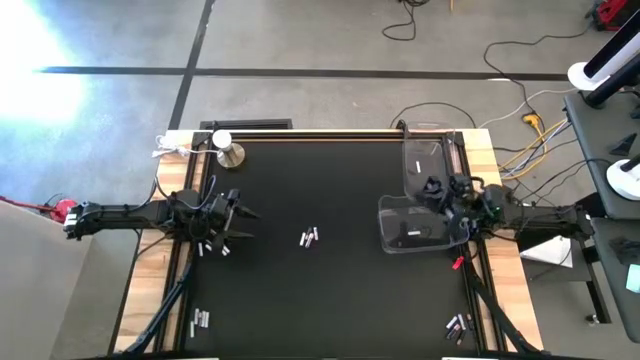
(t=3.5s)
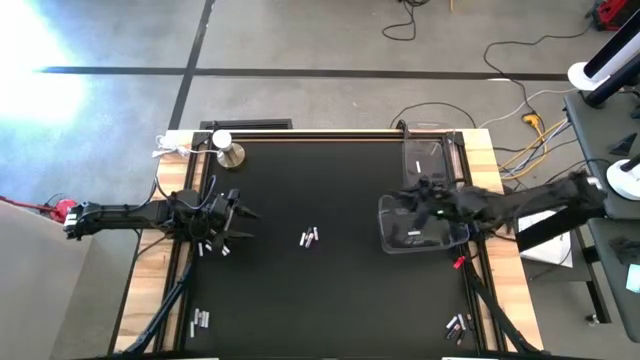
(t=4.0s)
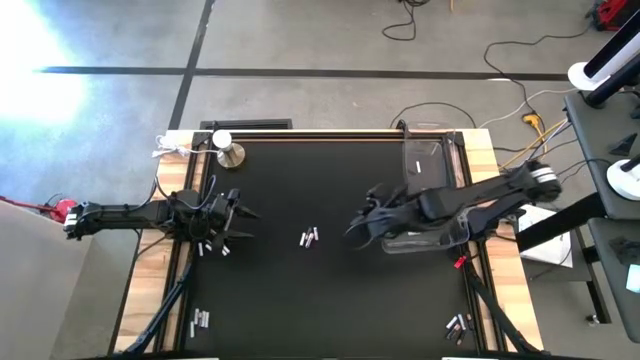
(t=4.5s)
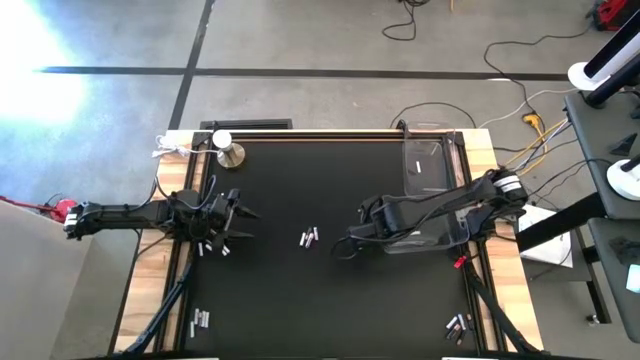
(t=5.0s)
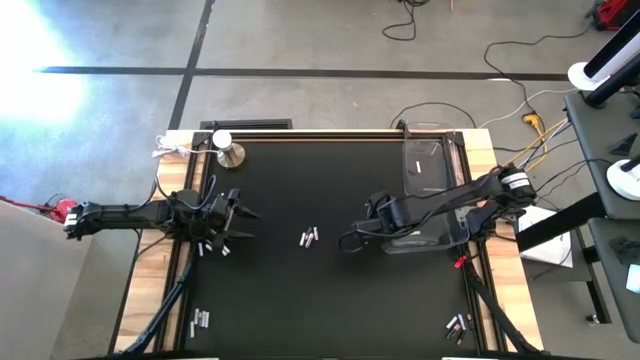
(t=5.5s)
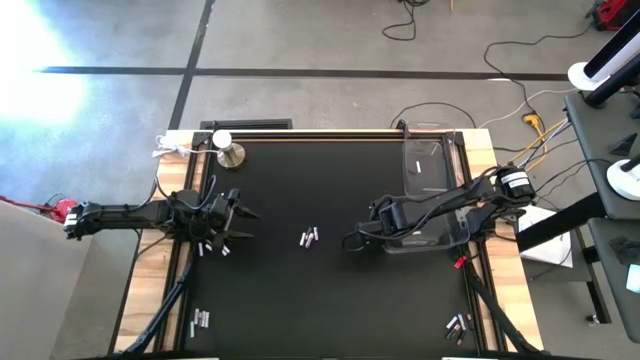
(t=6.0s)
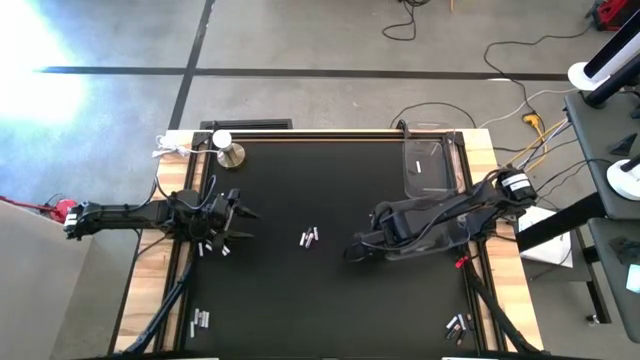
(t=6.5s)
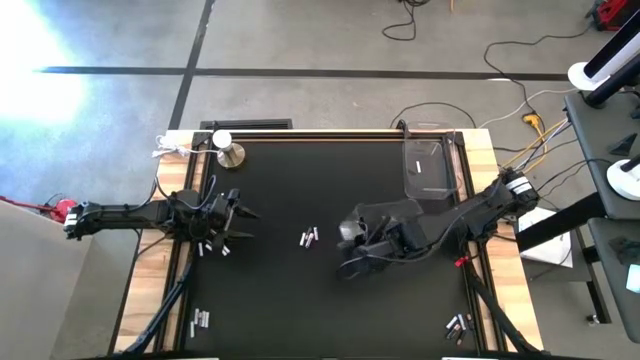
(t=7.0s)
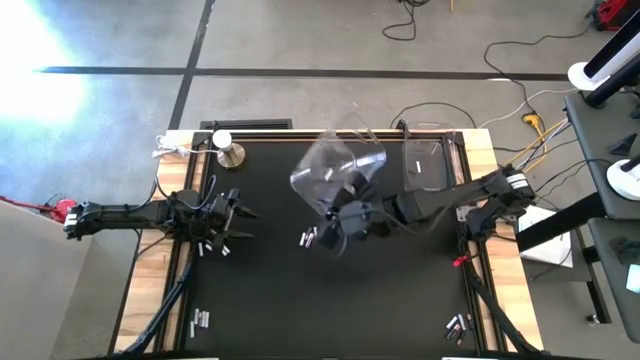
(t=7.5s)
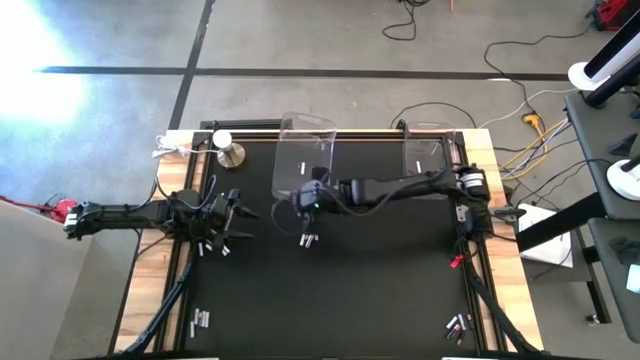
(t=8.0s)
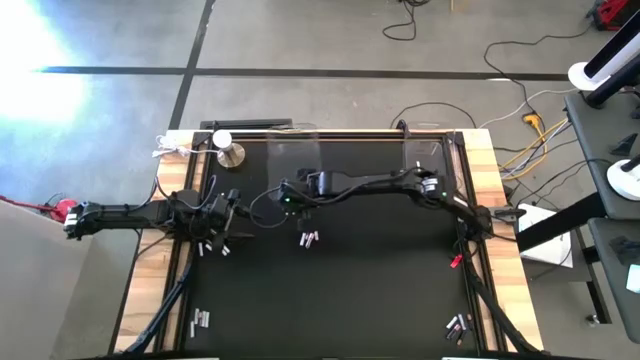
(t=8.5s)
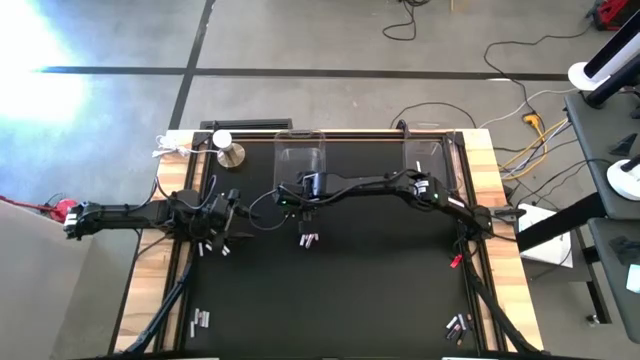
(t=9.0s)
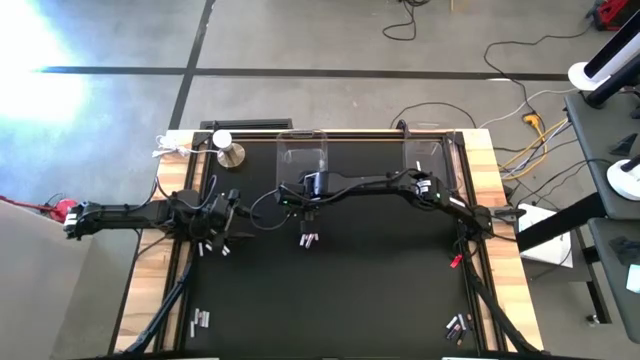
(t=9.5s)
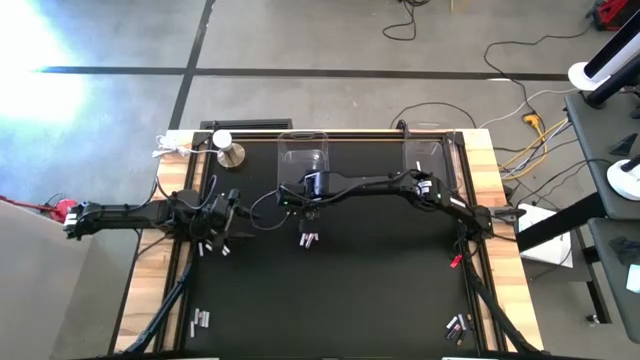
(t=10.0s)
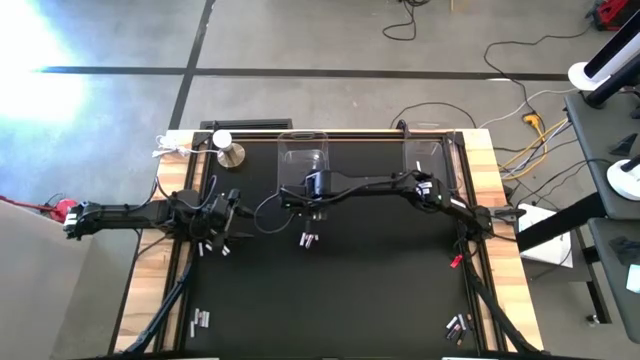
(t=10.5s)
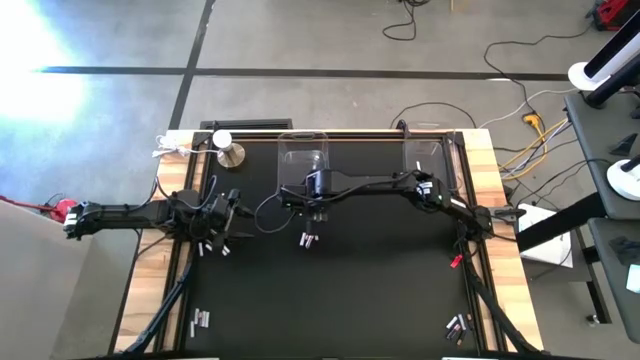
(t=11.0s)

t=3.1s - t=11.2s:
Task: Sort batteries
Move the bottom transparent bin to the top center of the table

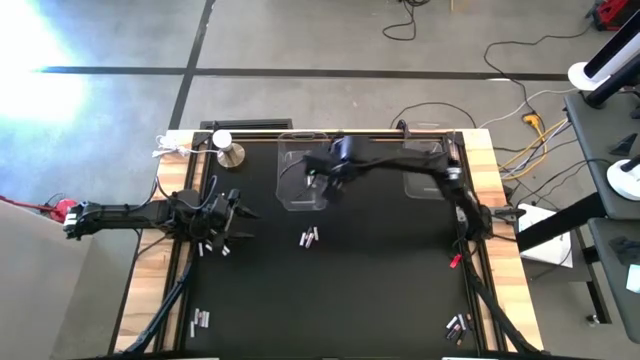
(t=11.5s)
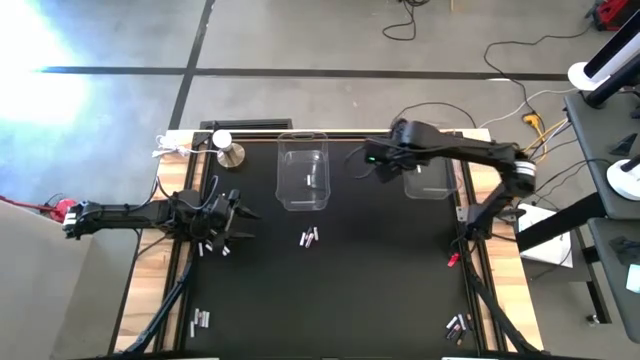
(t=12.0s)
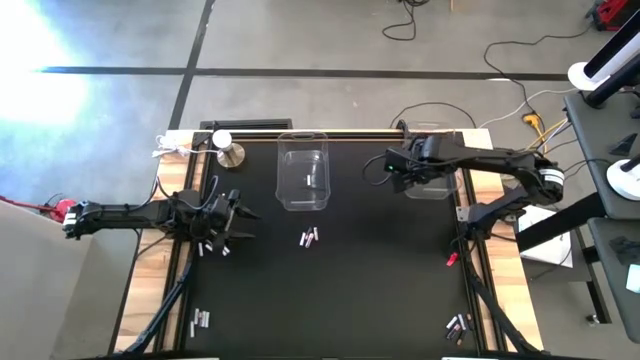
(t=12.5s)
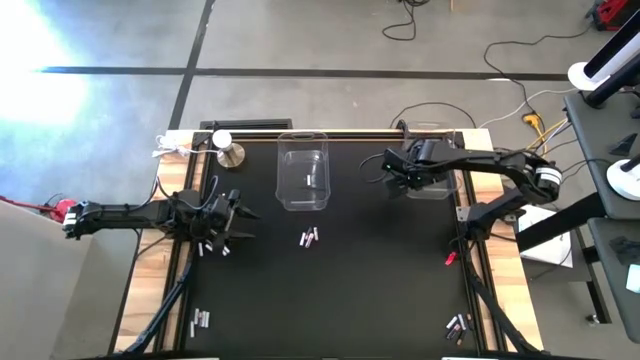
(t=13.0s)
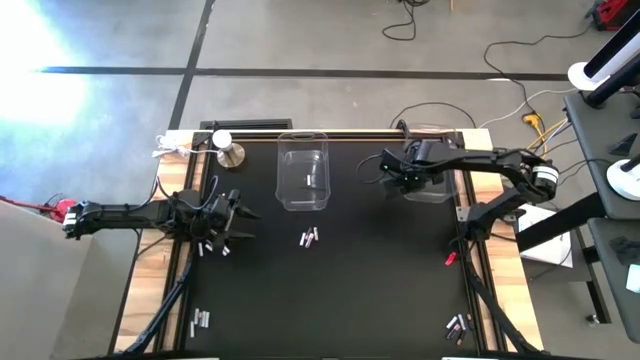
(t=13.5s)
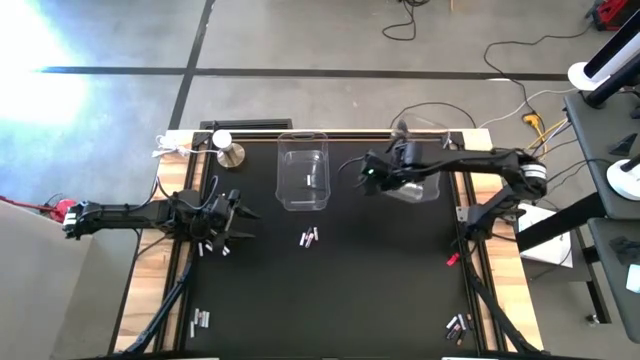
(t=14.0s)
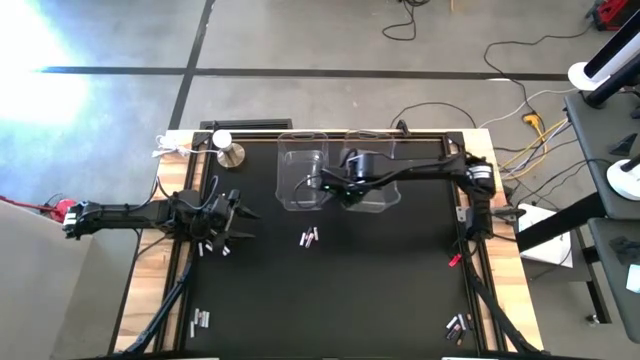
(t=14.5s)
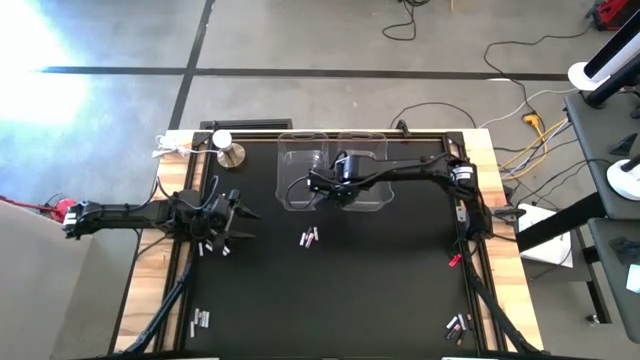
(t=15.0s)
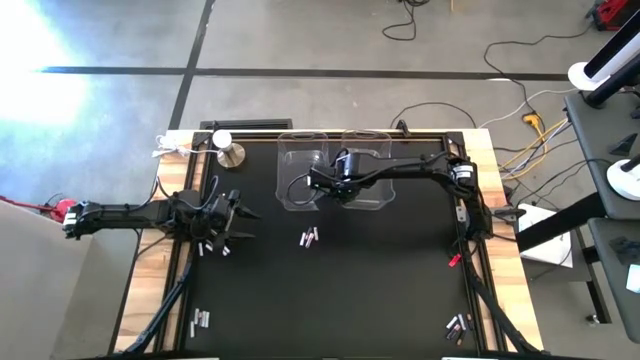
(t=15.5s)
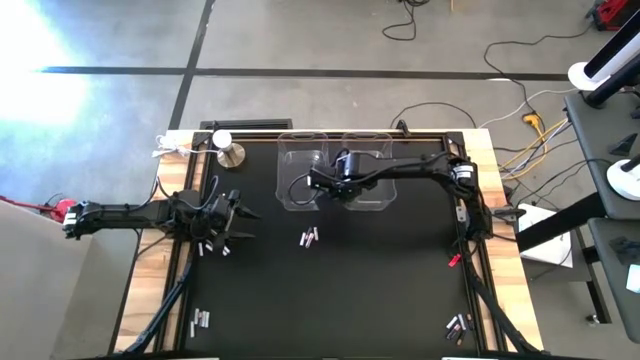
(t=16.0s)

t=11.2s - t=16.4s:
Move the right transparent bin to the right of the left transparent bin

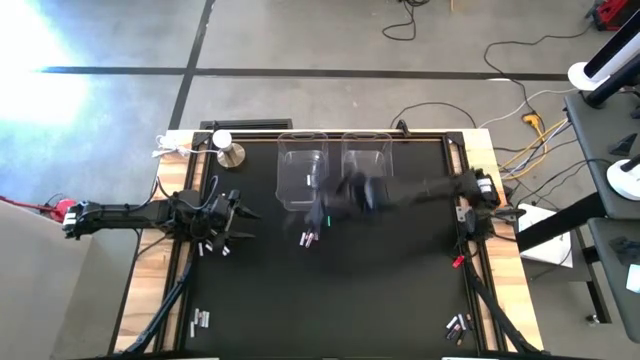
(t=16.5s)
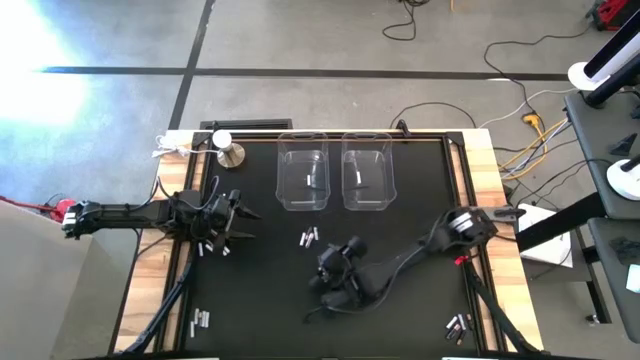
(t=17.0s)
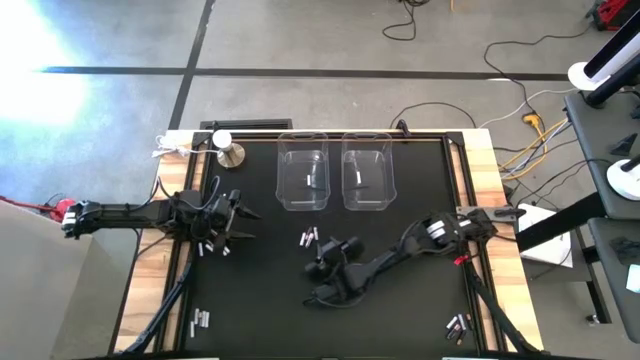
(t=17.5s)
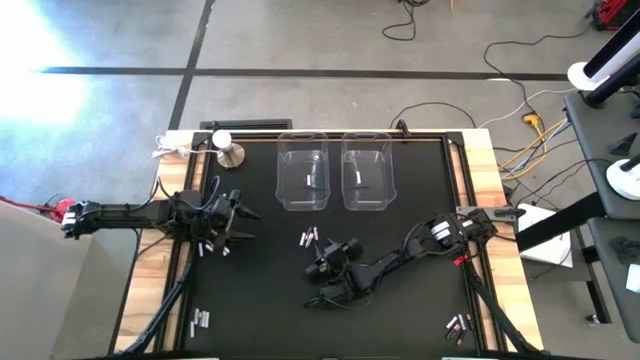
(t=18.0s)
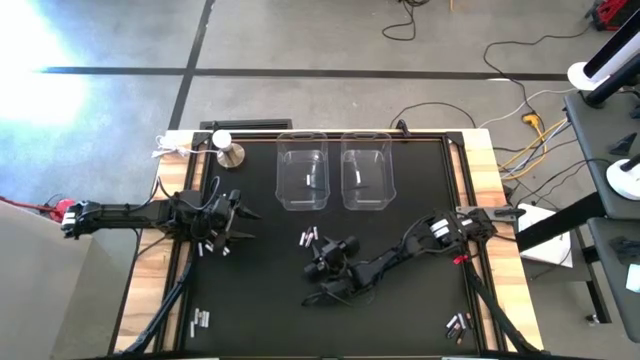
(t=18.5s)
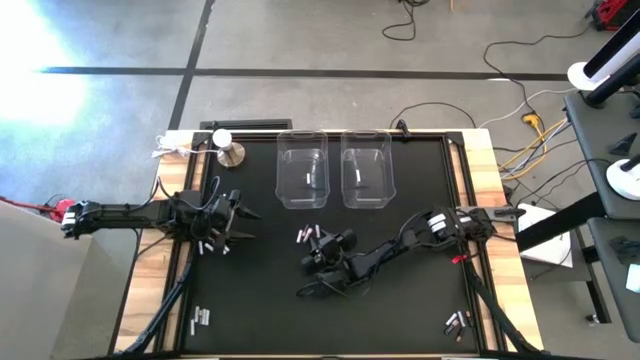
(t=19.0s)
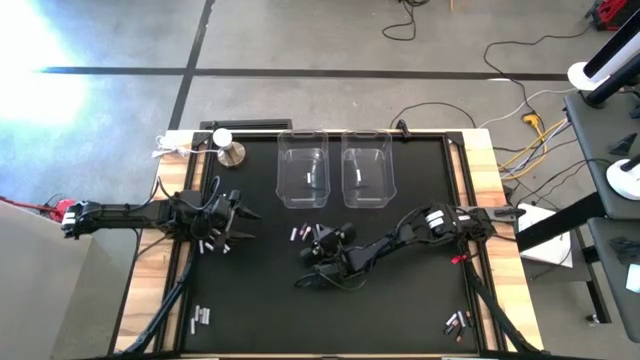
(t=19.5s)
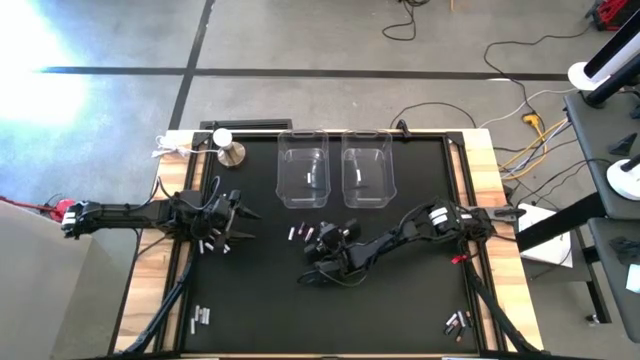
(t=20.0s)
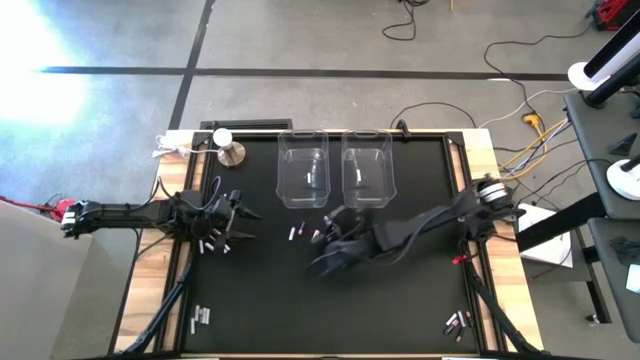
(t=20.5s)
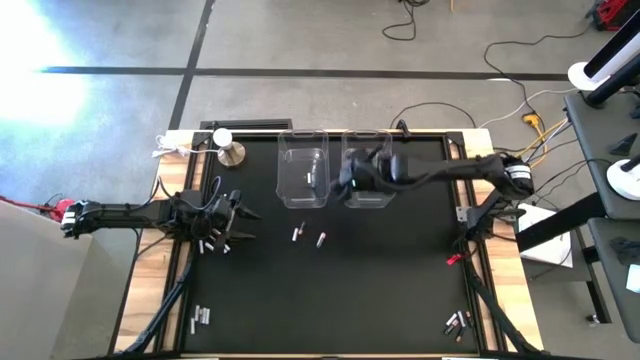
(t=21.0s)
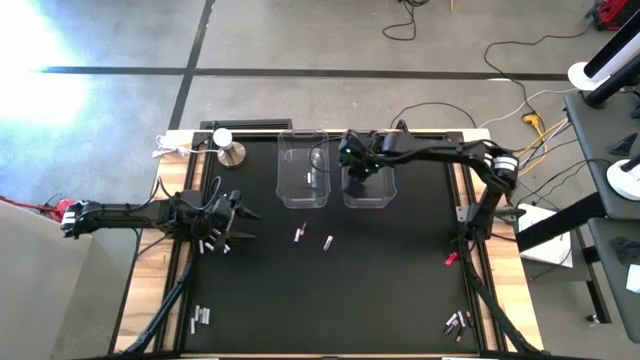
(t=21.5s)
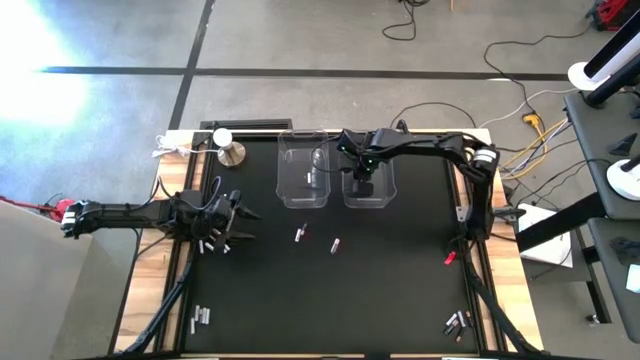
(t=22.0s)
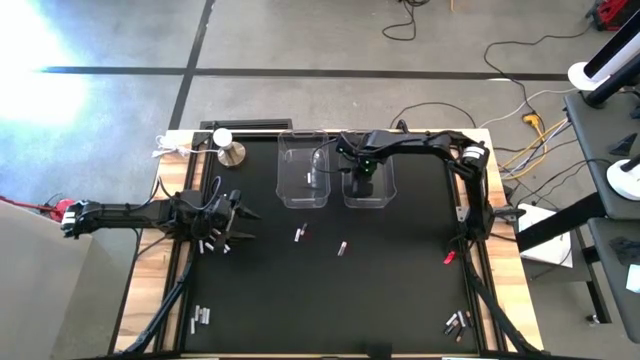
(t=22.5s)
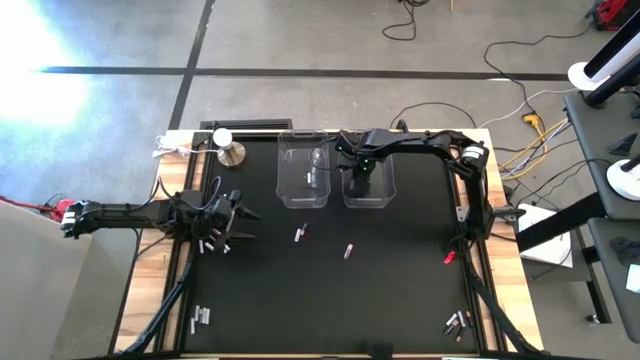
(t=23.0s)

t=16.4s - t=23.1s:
Put the white battery into the right transparent bin

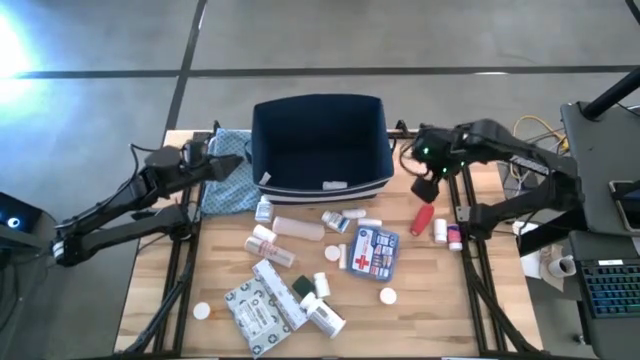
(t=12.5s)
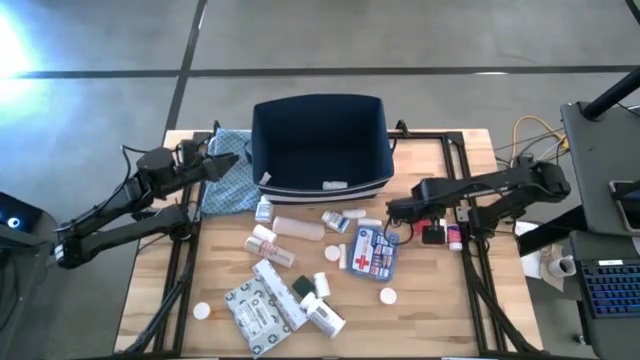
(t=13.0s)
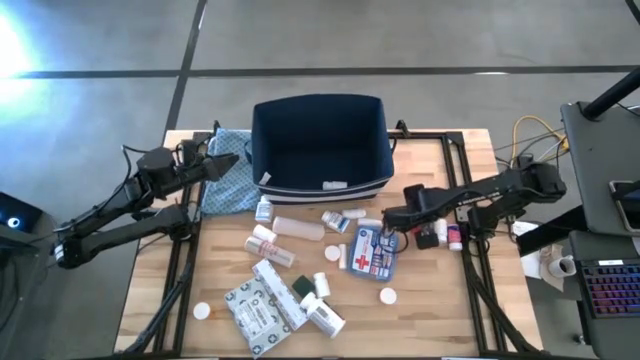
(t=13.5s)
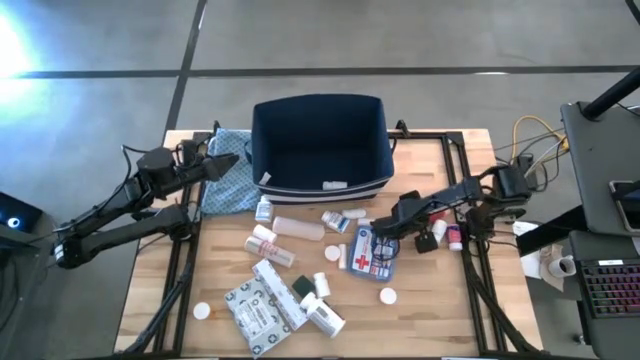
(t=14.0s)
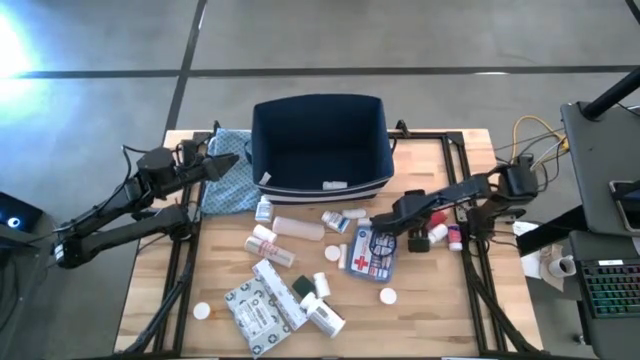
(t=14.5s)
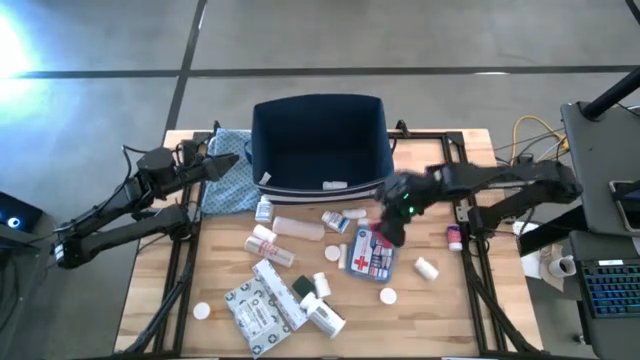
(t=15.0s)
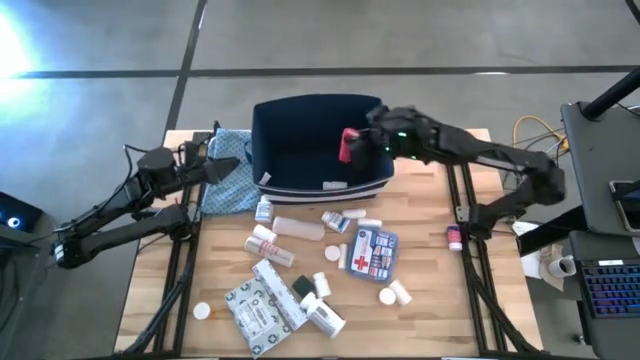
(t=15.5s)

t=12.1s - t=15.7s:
Task: Pick & place medical supplies in basket/bin
Put the red bandage into the blue bin
